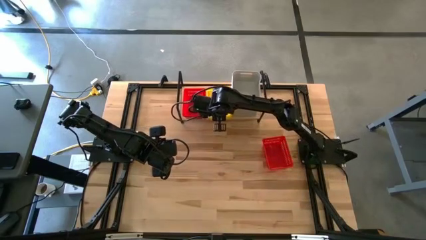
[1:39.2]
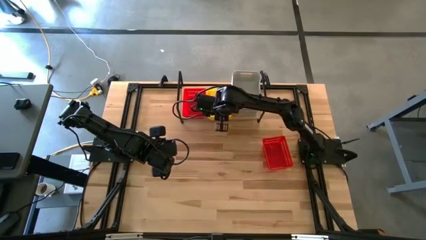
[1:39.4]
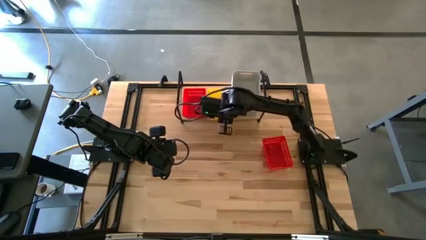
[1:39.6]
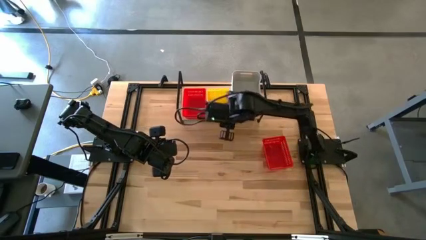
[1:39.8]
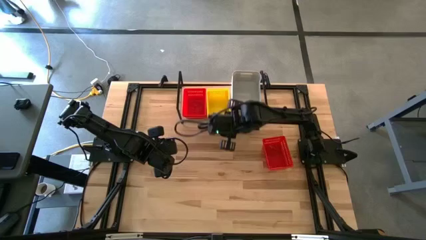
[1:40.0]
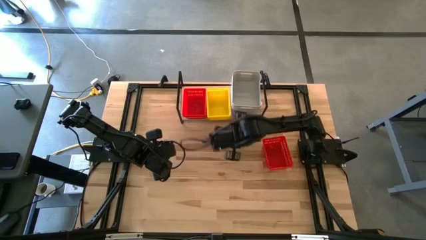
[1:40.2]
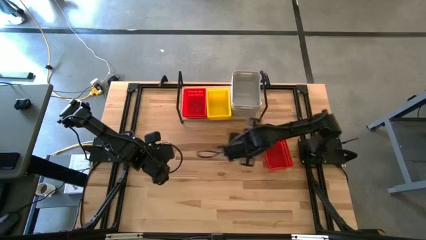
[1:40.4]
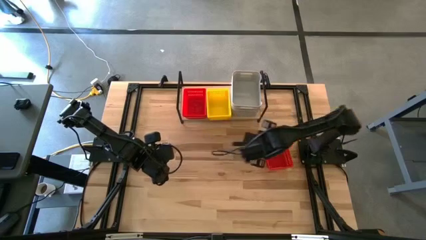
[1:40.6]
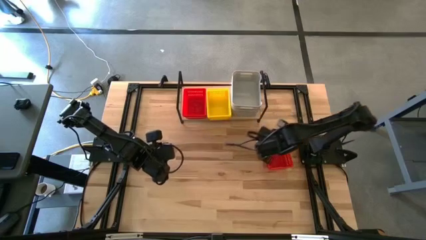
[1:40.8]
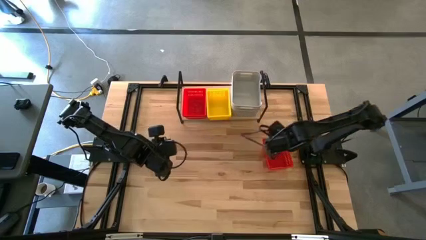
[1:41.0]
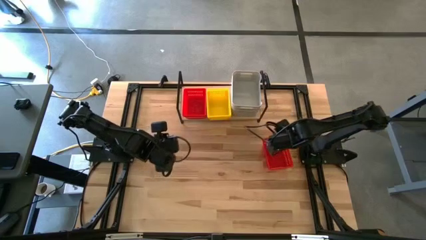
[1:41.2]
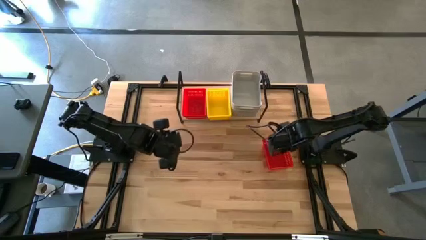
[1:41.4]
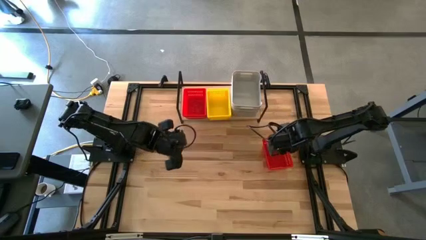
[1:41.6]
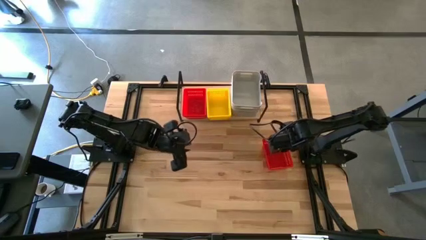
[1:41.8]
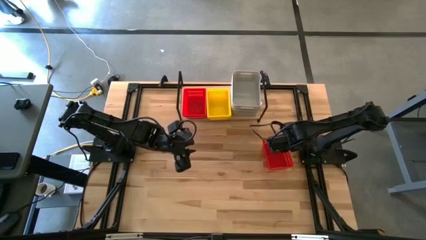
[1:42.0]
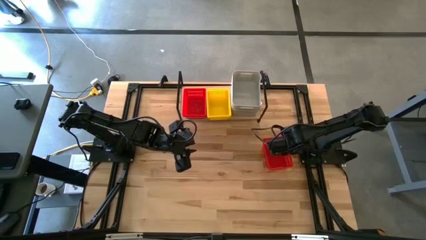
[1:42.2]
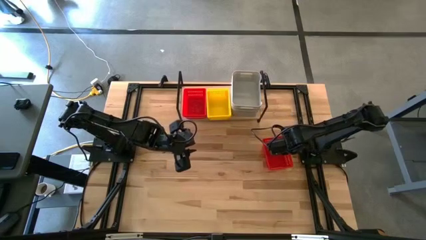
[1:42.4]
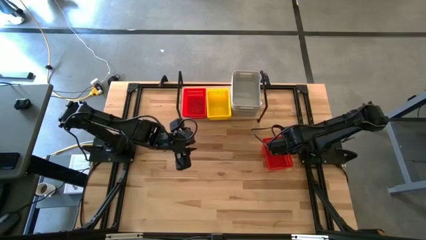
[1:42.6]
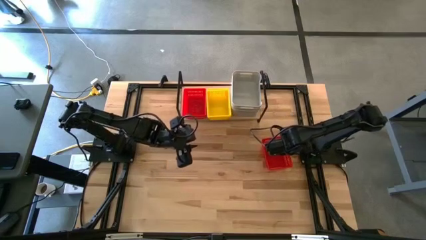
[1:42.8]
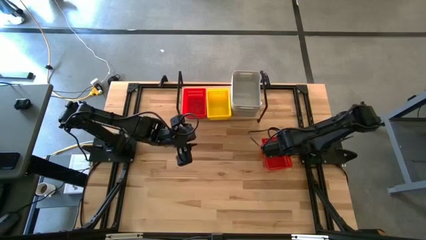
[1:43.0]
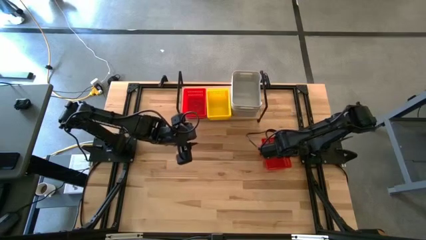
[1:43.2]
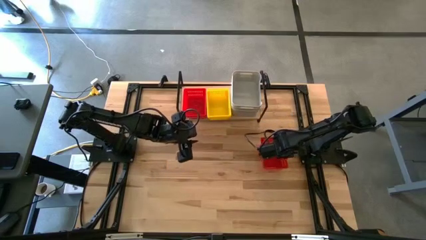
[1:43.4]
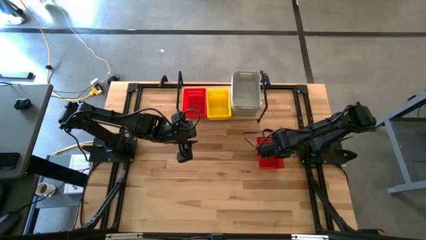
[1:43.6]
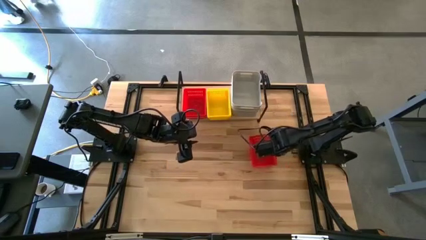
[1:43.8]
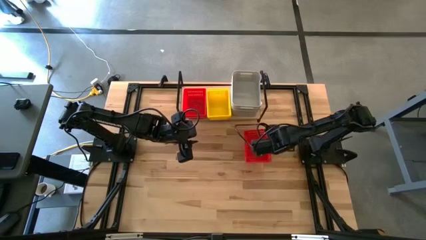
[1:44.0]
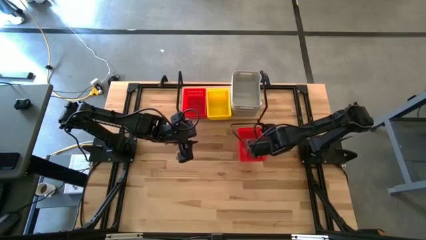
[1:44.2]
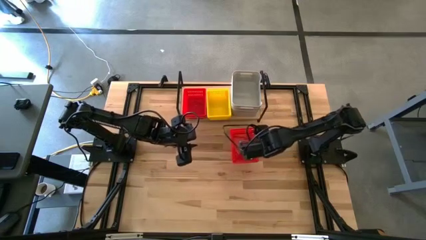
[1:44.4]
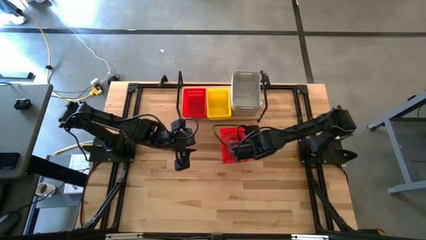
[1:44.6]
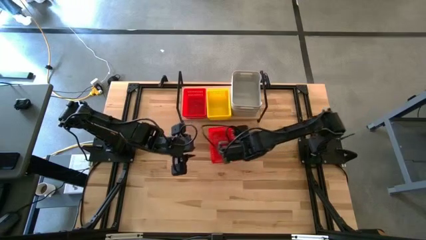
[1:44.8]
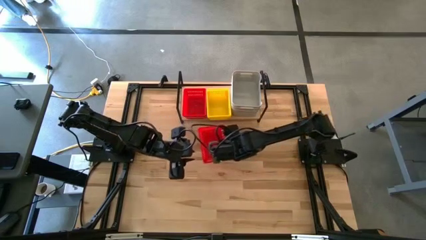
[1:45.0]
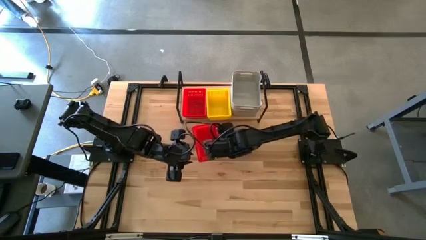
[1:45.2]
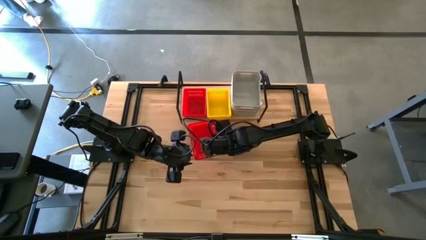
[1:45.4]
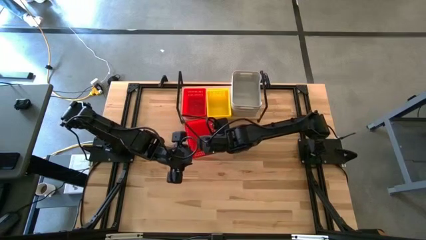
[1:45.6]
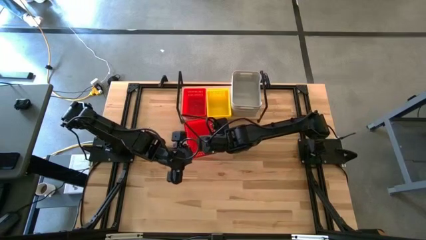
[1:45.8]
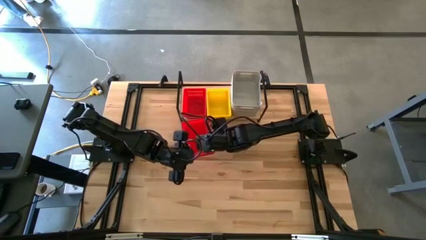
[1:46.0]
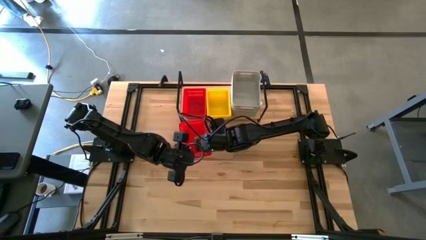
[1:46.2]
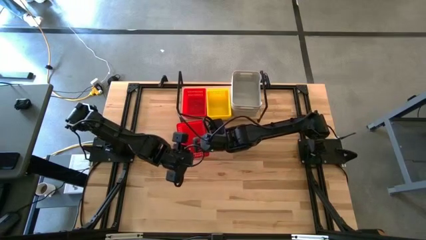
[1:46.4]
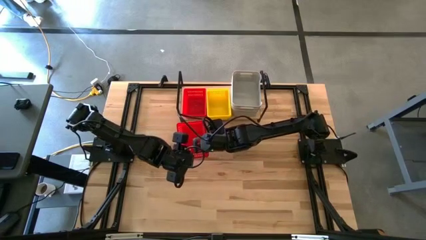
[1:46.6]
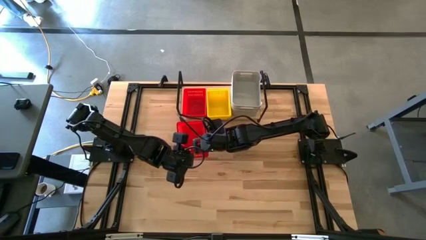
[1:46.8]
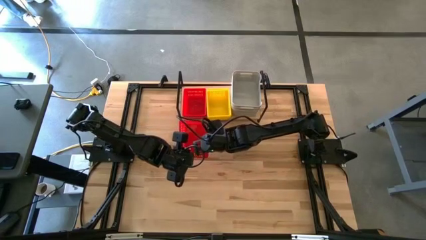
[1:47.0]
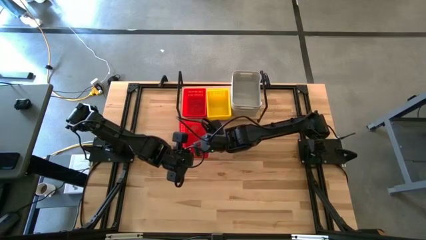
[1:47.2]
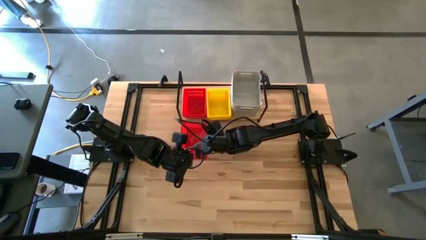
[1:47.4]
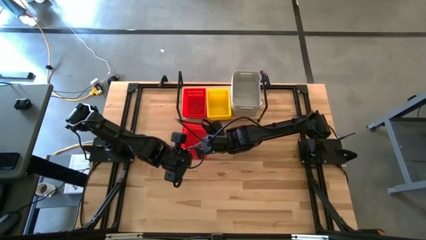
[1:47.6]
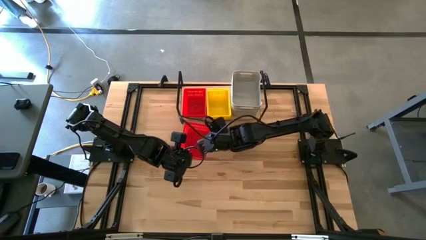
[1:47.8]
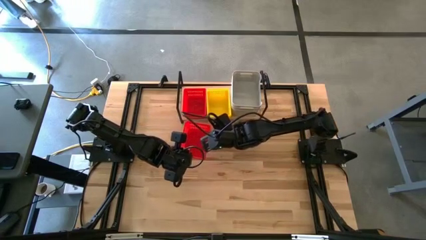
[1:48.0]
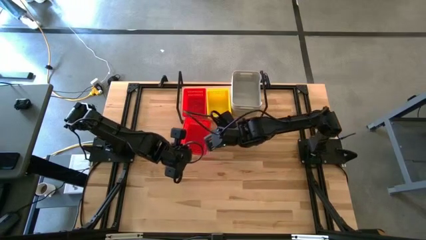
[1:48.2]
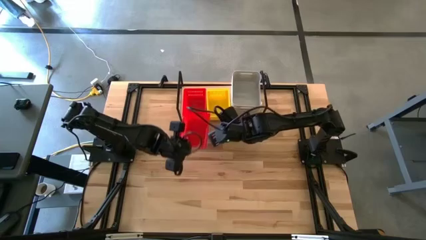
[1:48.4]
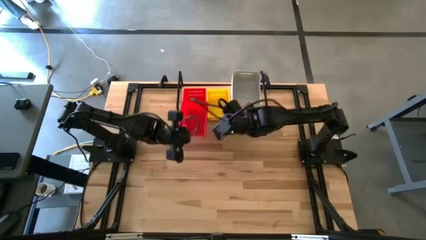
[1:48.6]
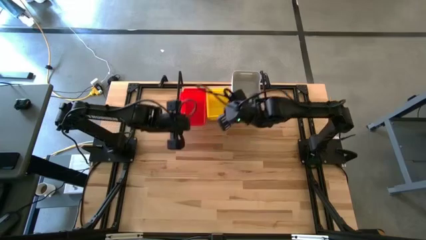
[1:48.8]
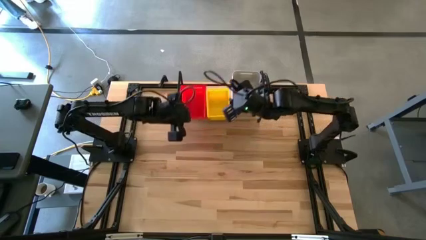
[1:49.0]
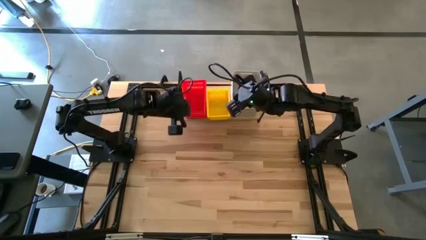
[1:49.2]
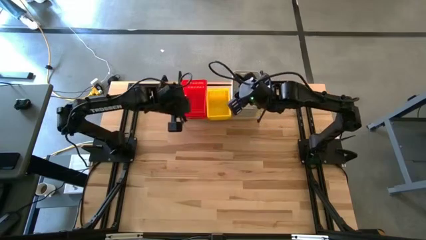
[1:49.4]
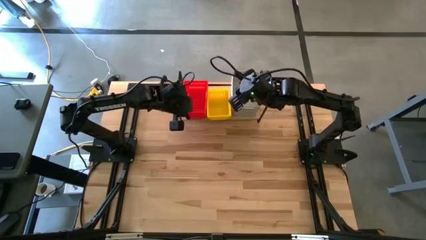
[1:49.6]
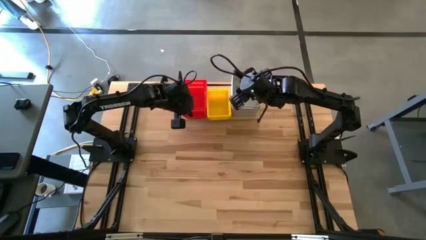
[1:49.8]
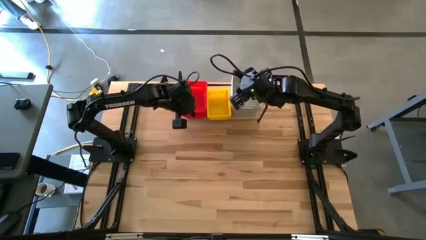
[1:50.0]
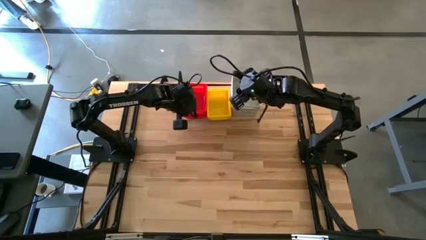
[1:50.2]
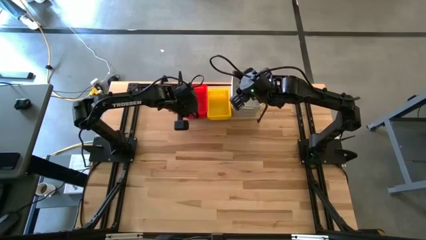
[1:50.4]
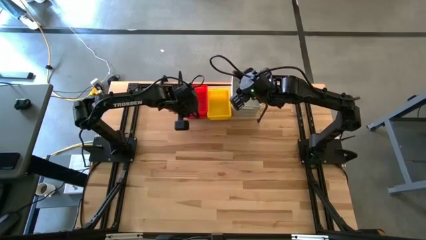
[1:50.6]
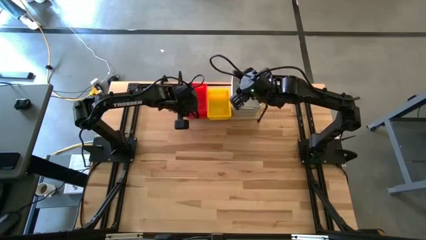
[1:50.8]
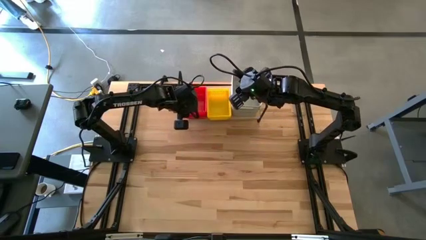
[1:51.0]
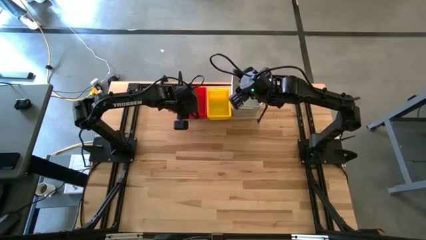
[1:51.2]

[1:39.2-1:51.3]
Task: Stack baskets on shelf by color
Stack the red bin on the red bins on the shelf

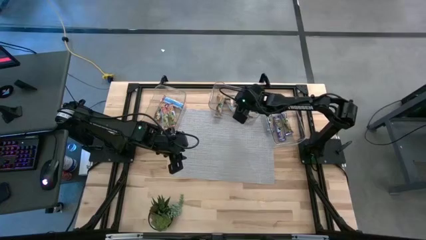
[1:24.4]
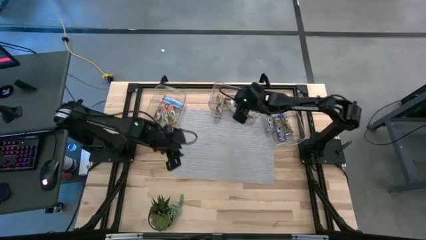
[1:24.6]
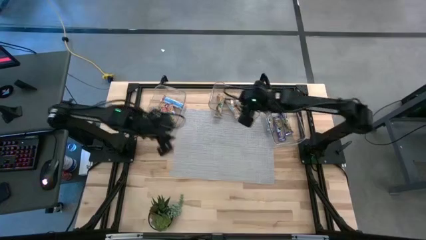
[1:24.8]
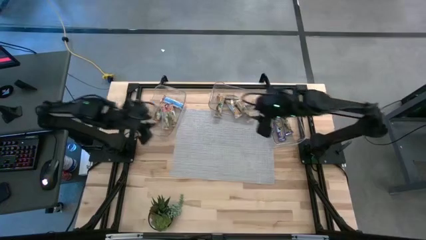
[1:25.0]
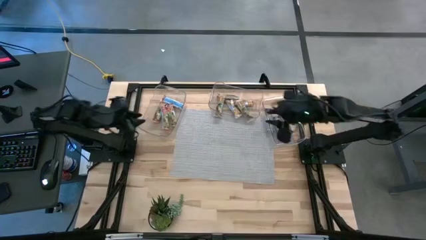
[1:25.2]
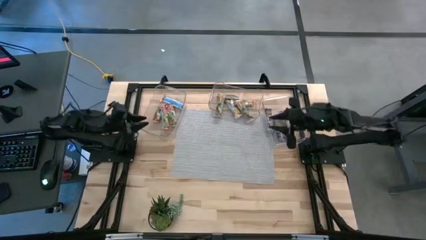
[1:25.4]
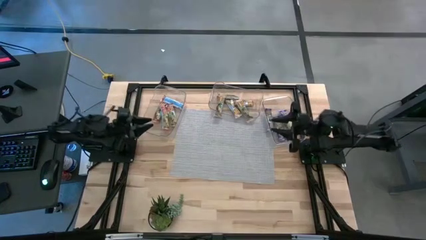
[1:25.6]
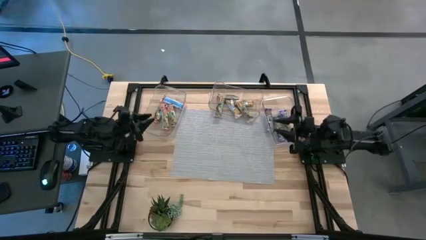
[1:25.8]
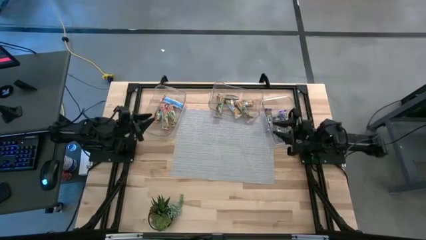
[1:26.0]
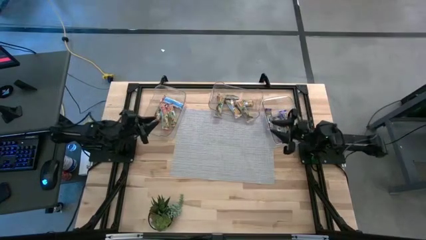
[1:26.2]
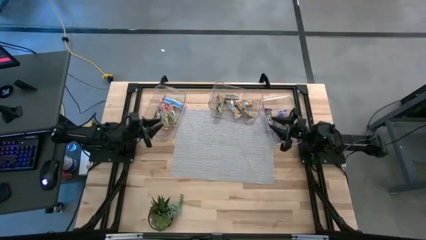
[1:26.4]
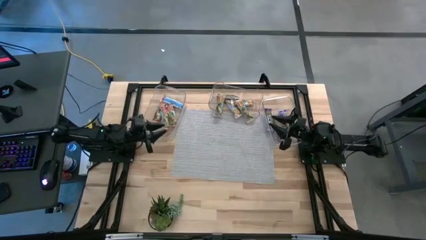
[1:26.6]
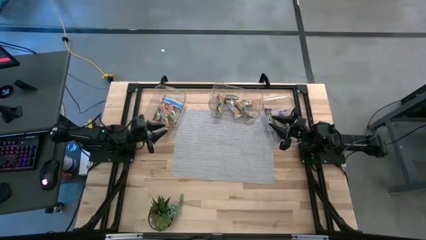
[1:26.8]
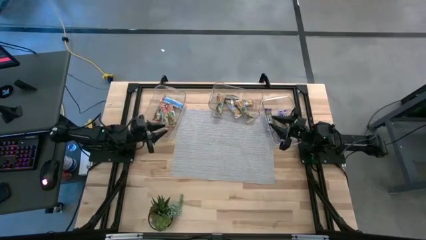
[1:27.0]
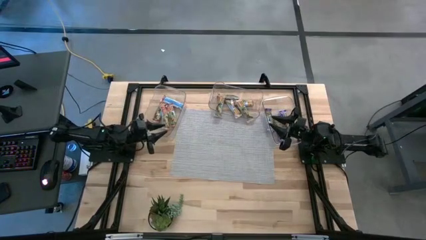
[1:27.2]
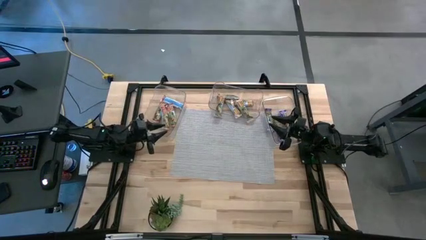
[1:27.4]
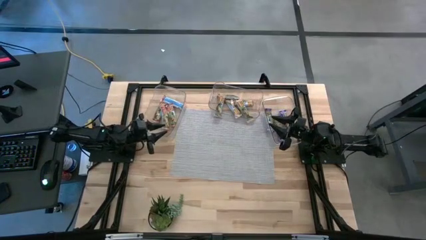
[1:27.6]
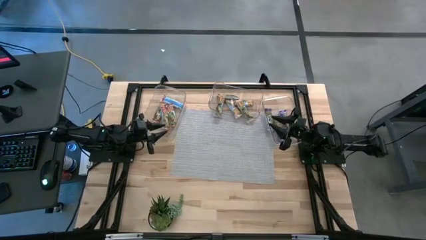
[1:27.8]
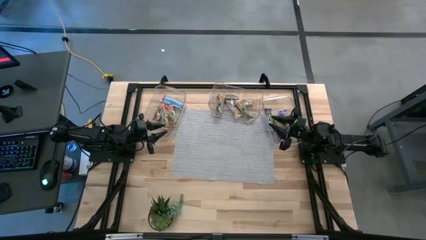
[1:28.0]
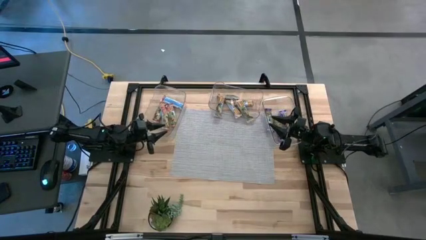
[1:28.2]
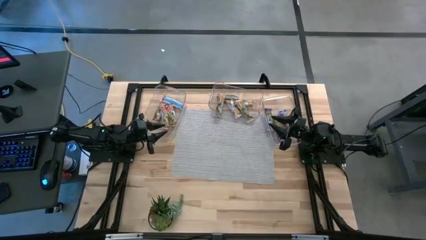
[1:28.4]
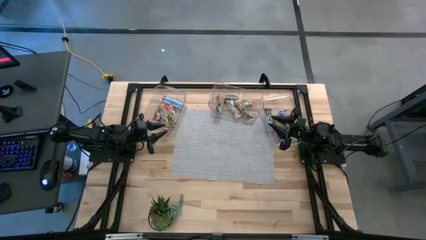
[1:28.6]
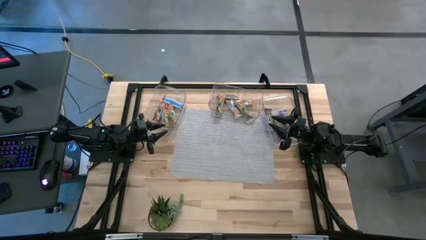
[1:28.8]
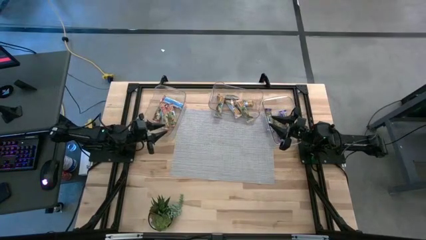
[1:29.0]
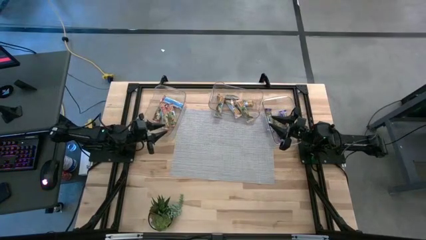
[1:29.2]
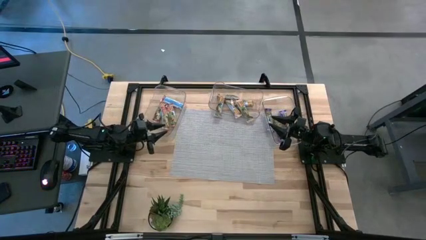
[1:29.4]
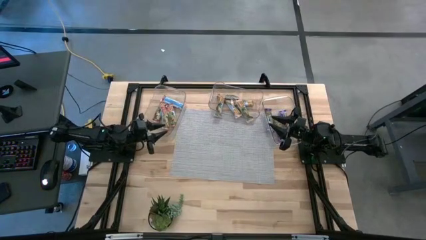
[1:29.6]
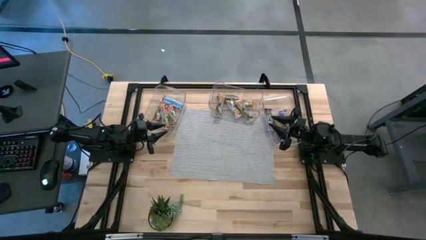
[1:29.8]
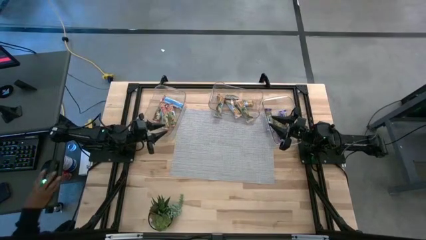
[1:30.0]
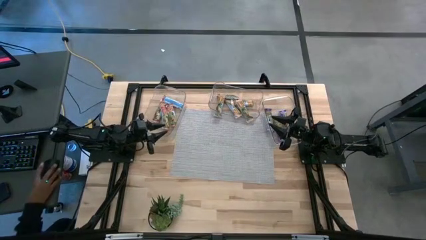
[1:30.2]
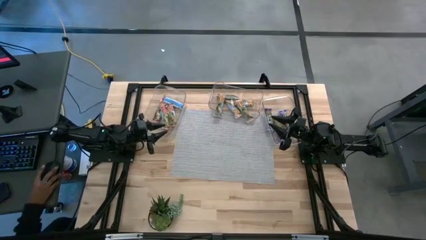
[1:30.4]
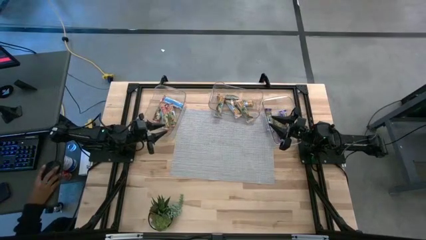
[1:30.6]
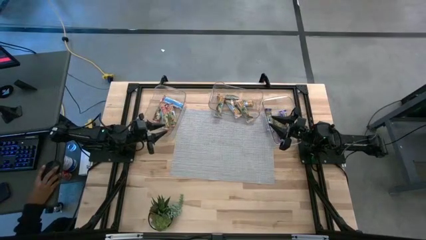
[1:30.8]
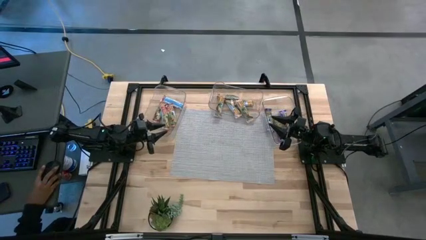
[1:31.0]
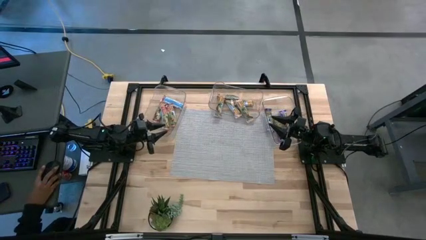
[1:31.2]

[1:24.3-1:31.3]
Task: Pick and place Granola Bars by type
Return to Home Position
